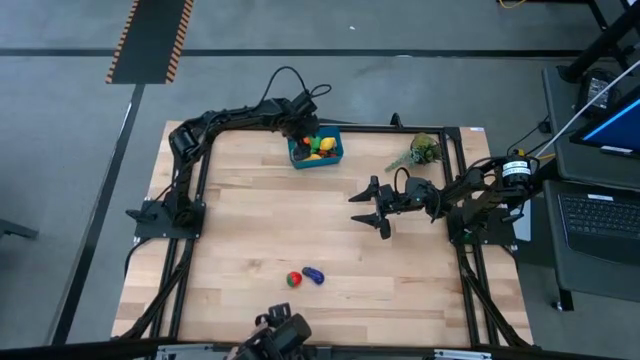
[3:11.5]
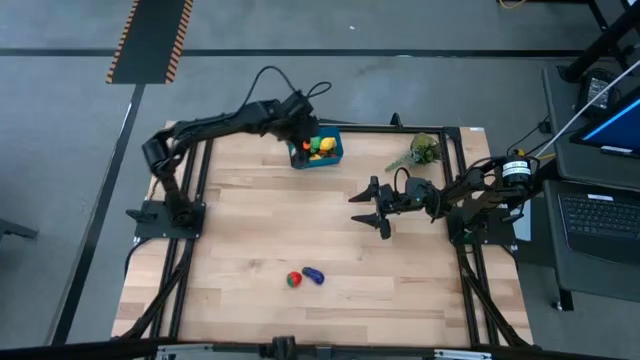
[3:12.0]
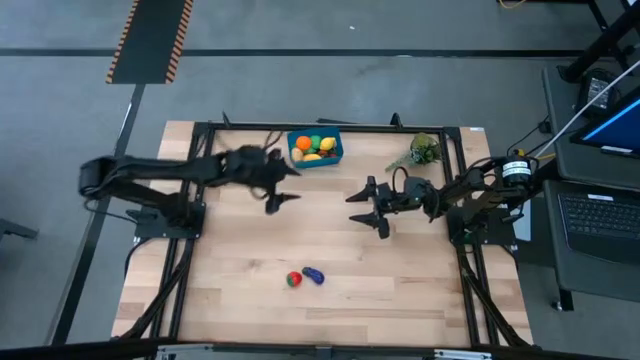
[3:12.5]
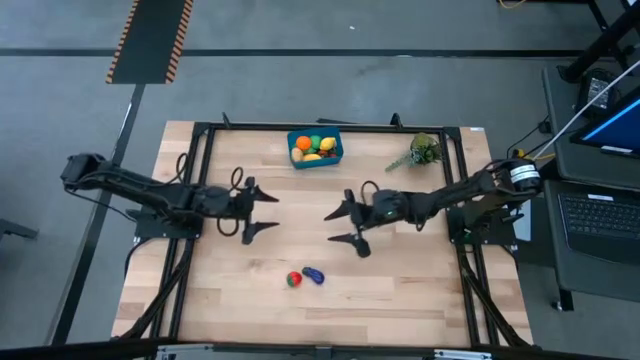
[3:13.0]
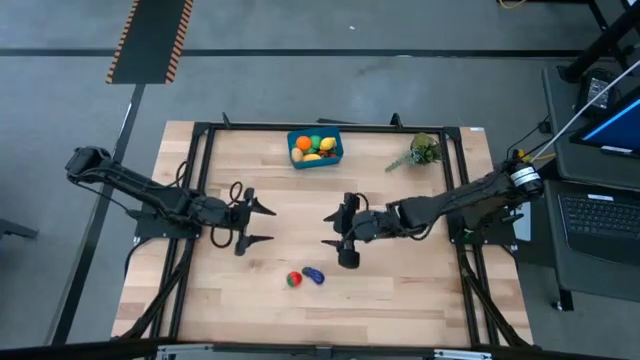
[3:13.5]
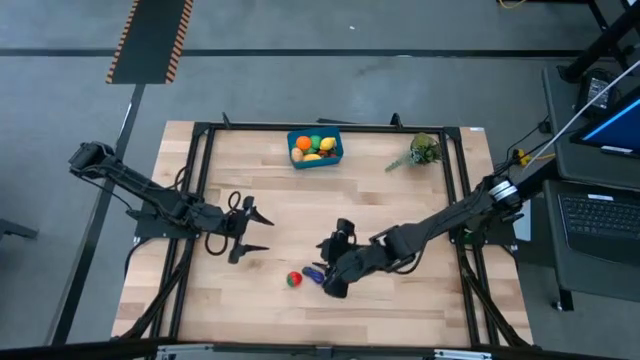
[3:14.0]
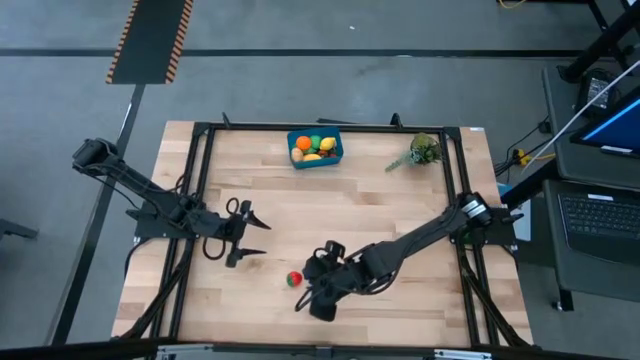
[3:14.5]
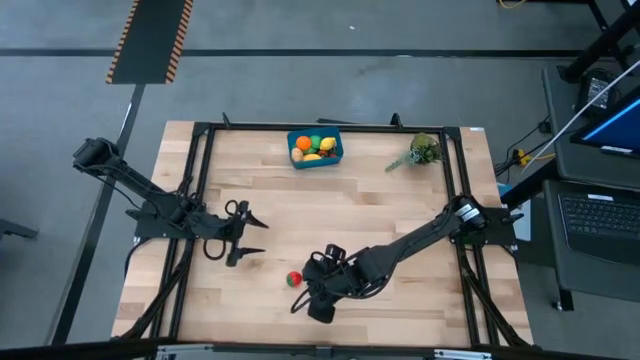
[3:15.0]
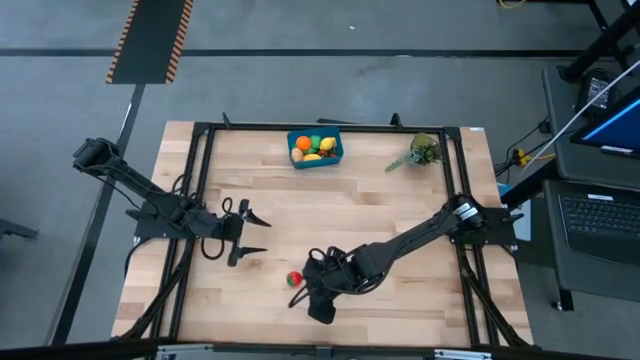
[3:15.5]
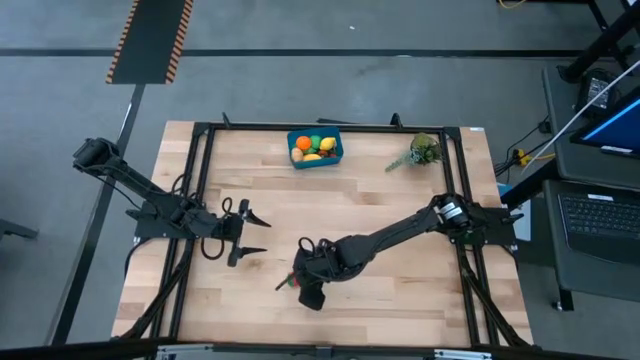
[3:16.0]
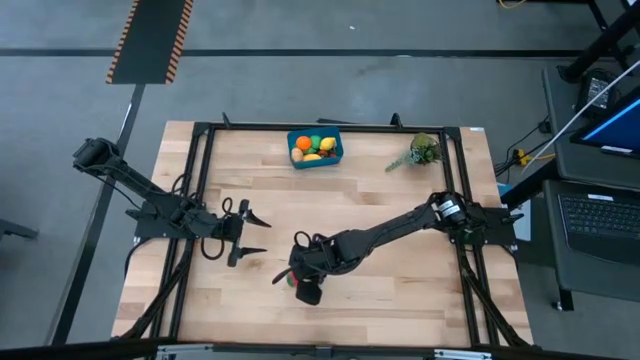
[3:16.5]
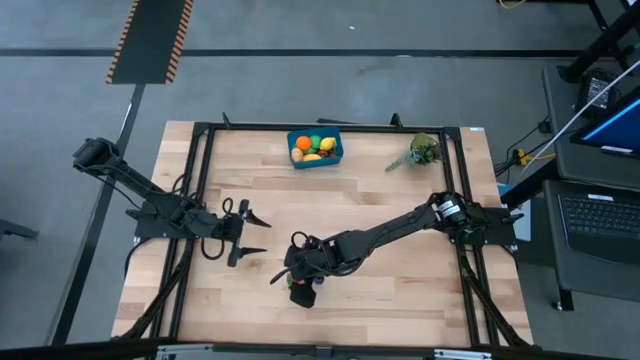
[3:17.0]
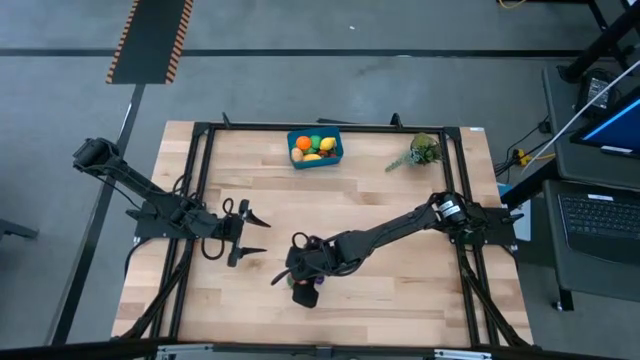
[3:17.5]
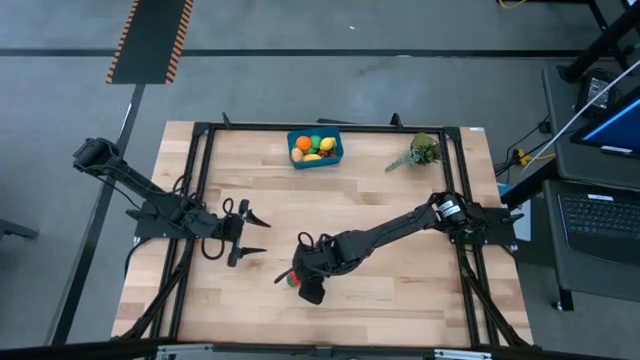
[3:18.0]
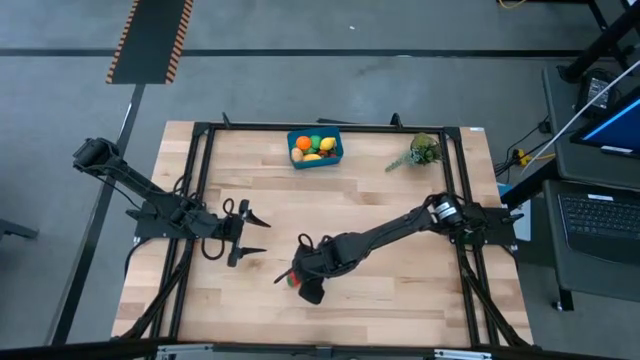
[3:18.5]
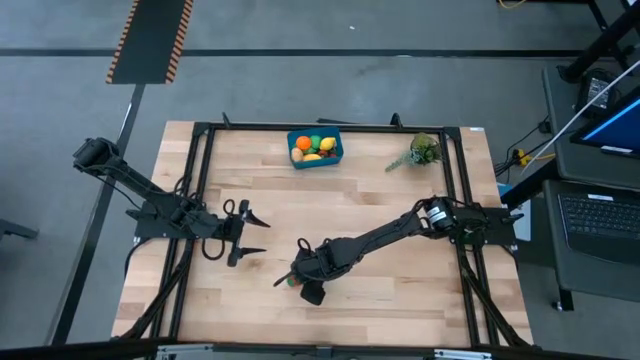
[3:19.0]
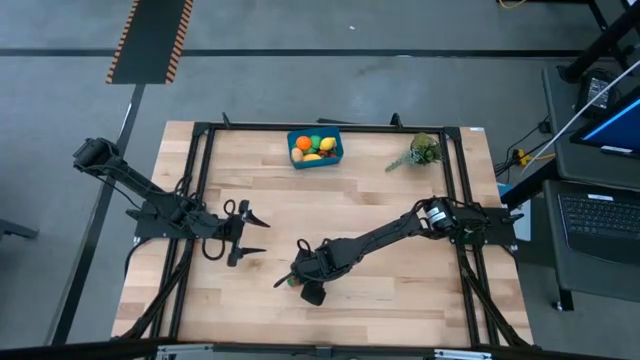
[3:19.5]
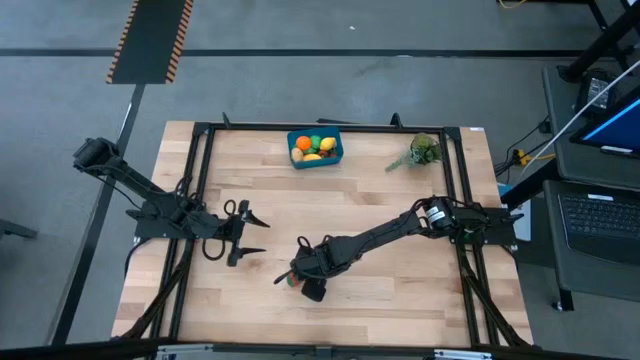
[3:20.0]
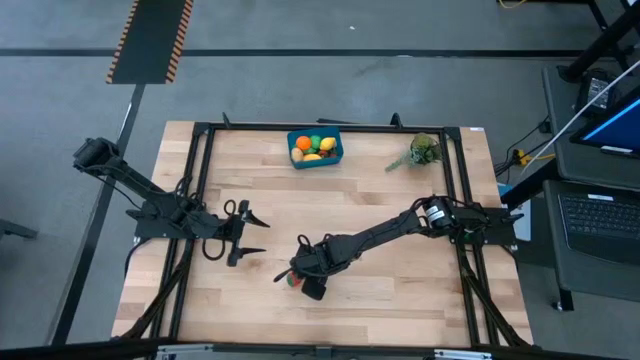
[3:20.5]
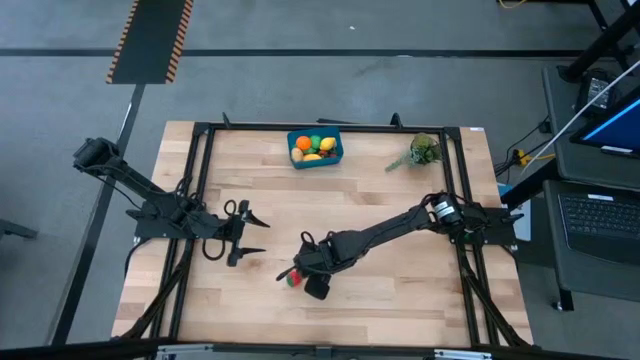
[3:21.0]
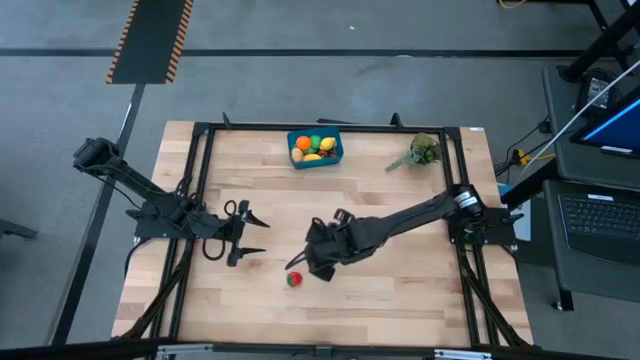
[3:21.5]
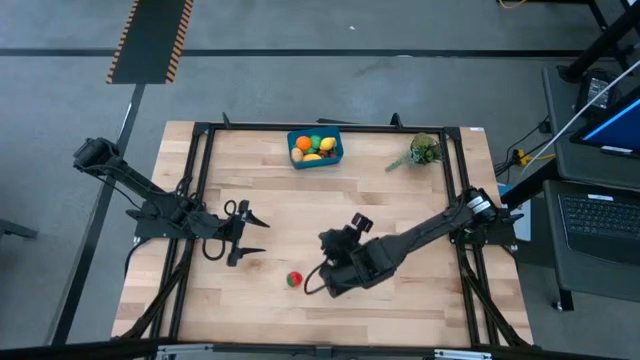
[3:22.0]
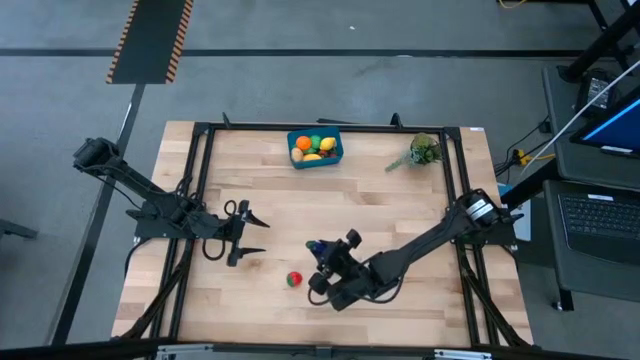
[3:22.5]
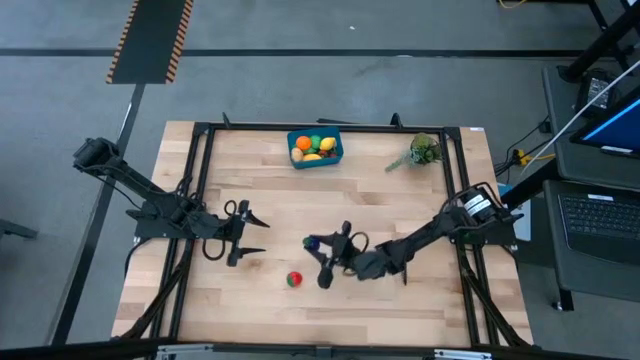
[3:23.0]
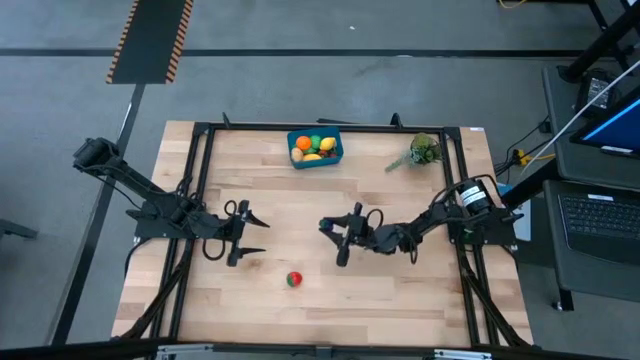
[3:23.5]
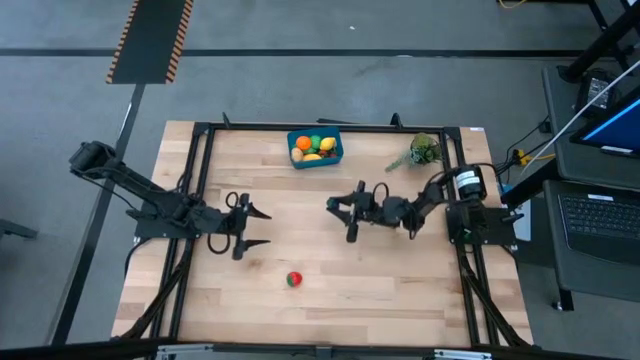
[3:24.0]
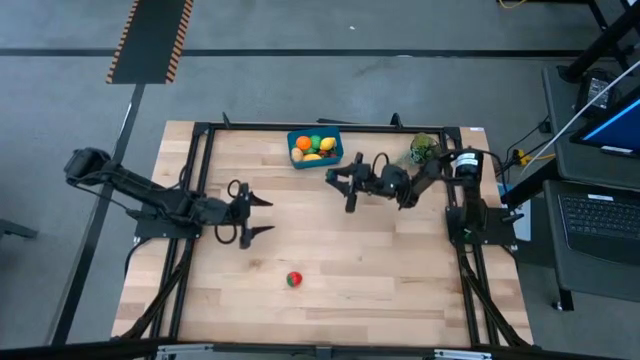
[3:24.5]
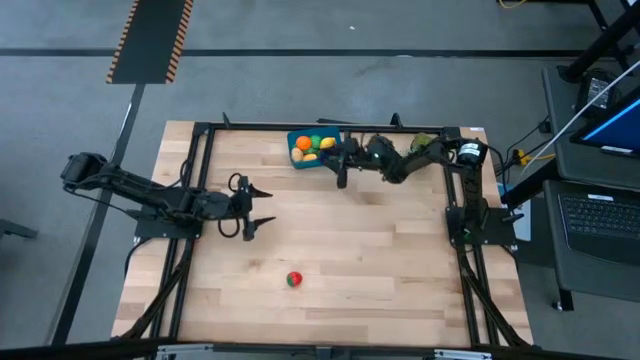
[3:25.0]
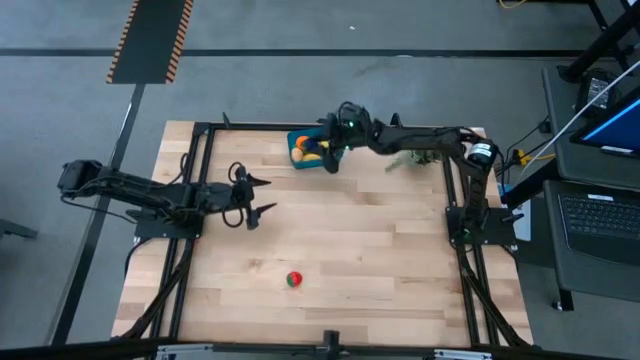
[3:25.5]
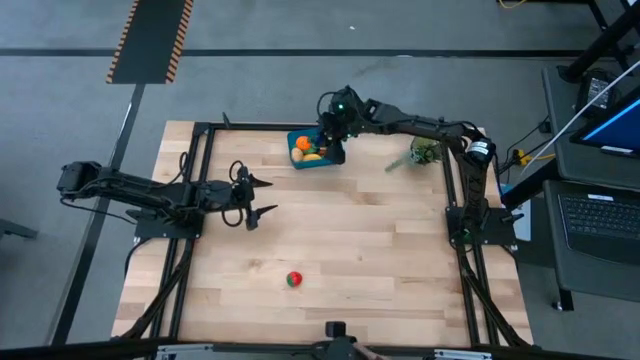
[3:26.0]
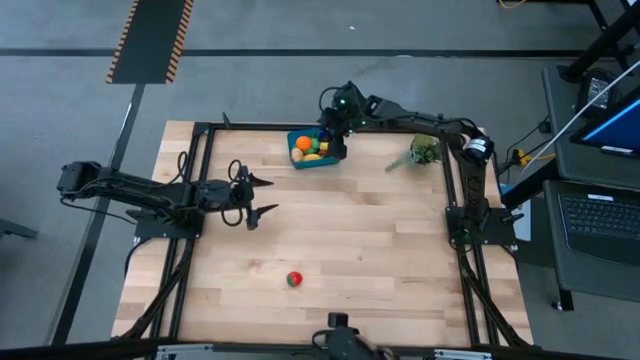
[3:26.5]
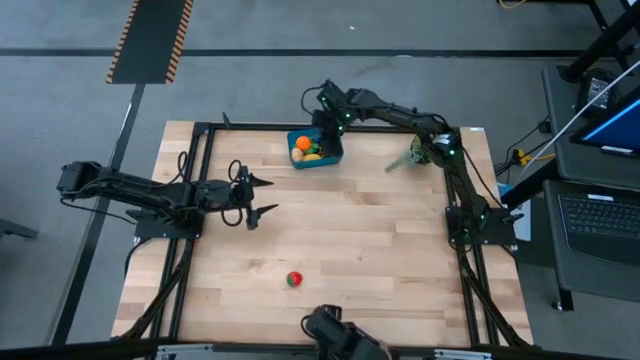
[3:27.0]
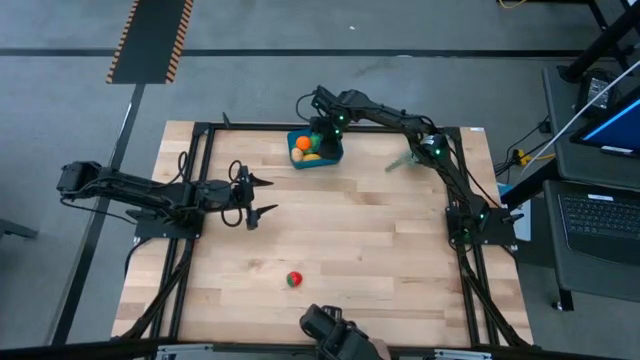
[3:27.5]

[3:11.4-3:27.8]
Task: Pick and placing Produce into tupperware
Put the eggplant into the blue bin

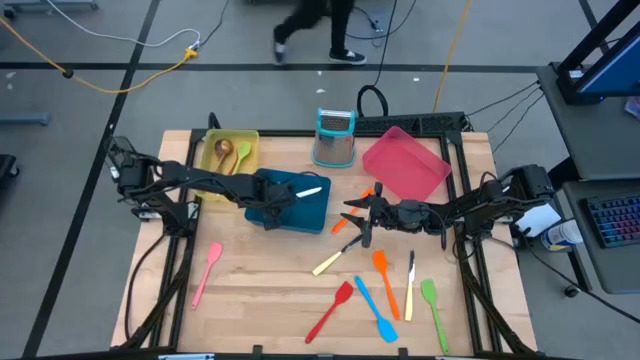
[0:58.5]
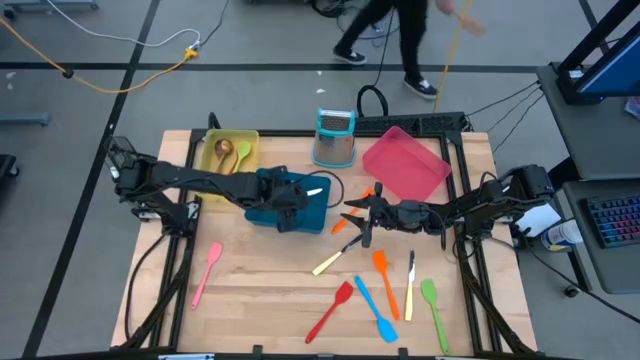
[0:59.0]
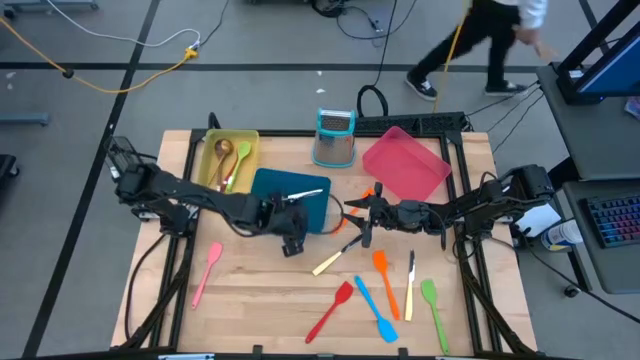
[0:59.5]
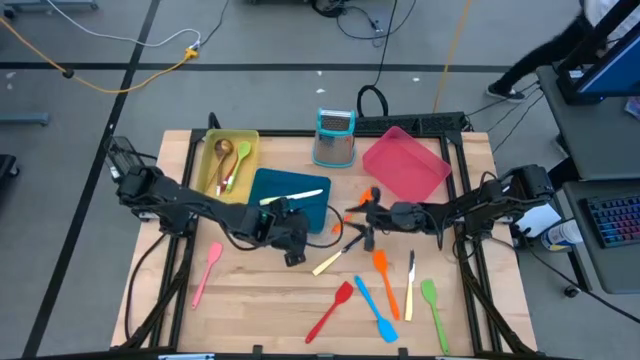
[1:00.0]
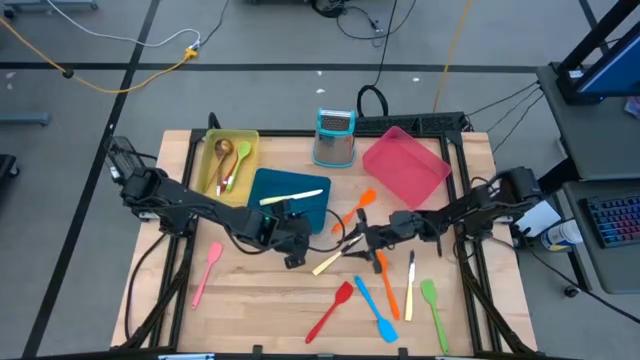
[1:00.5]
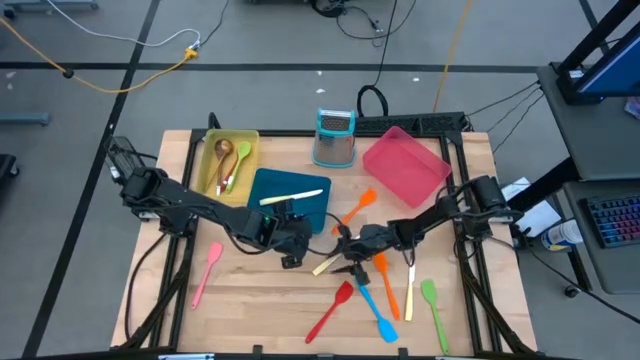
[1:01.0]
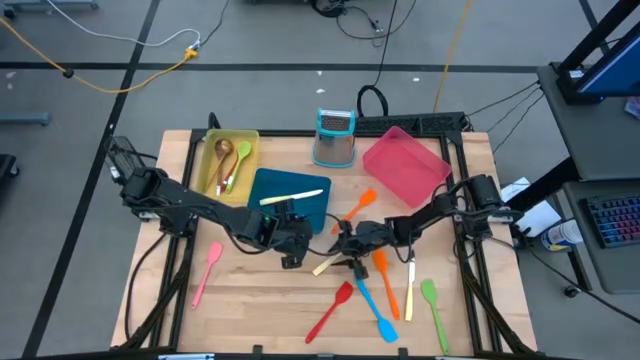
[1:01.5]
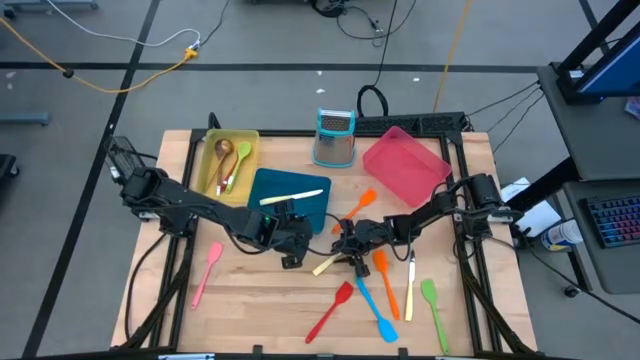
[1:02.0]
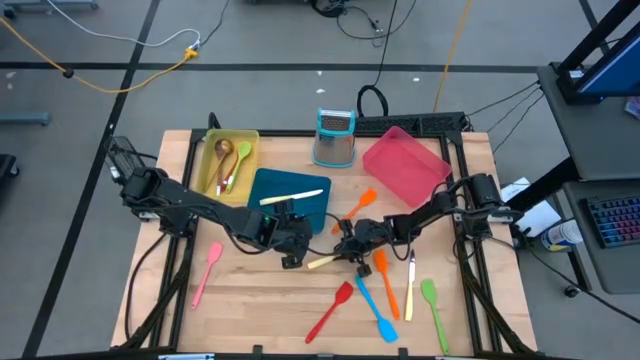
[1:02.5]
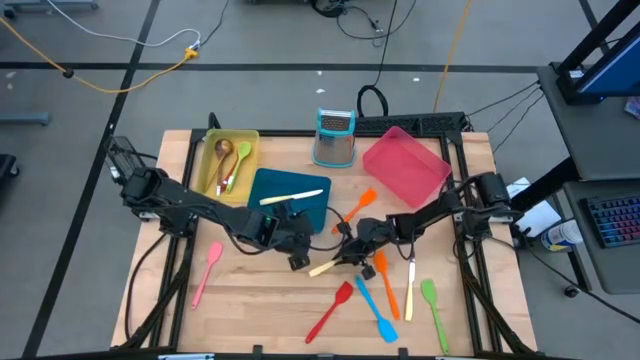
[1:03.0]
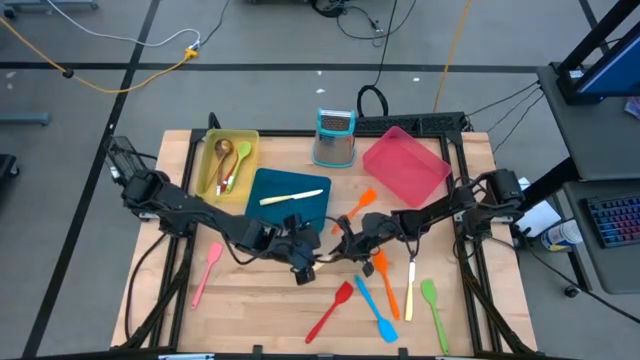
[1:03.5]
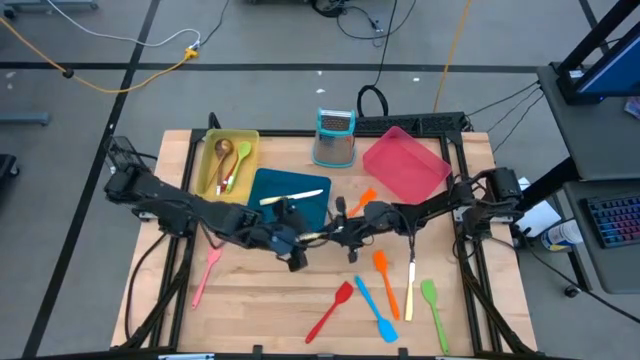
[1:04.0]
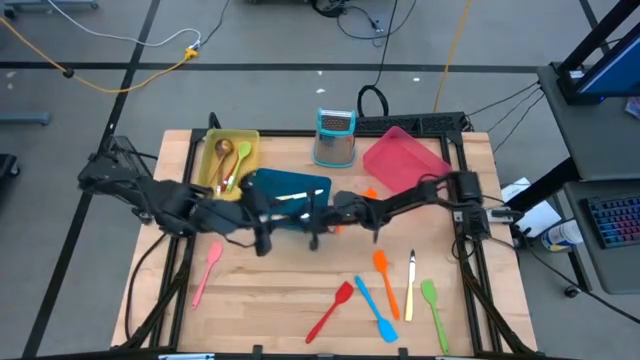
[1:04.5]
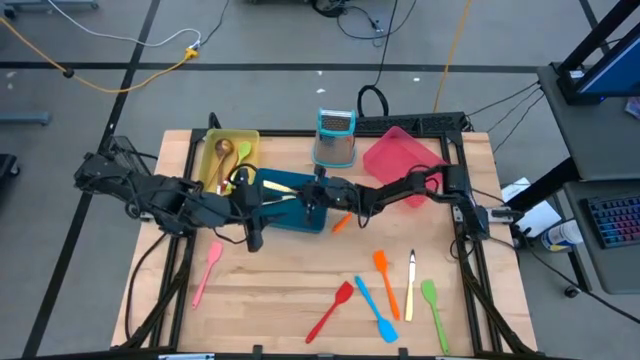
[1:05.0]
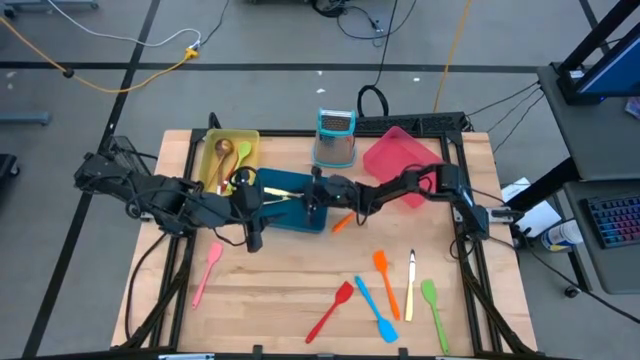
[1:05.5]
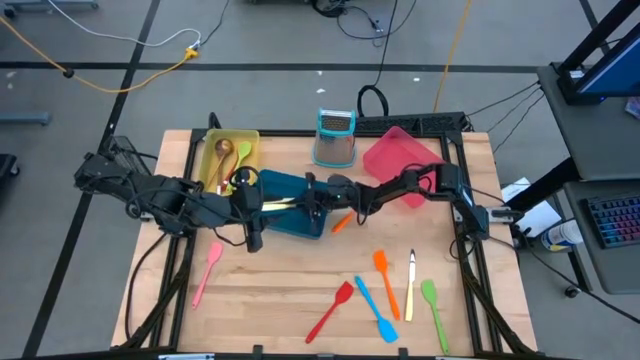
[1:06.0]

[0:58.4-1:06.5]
Task: Pick & Place Kitchen Items
Put the top yellow table knife into the blue bin
